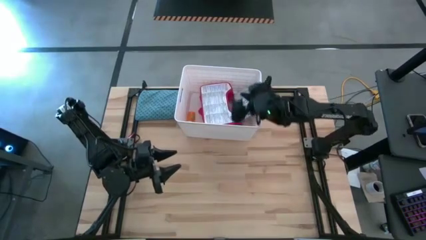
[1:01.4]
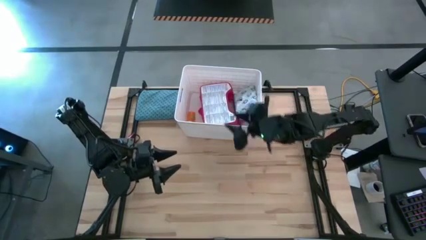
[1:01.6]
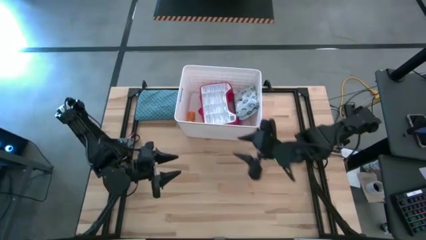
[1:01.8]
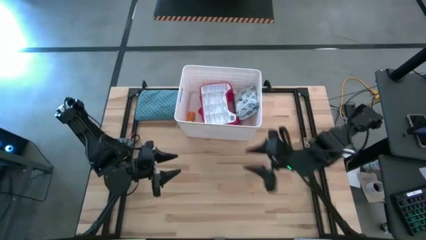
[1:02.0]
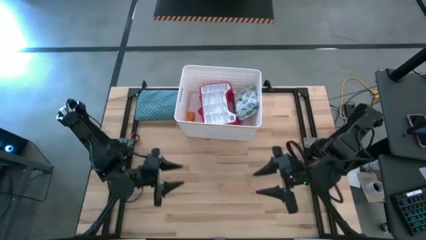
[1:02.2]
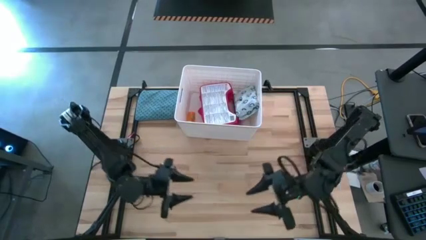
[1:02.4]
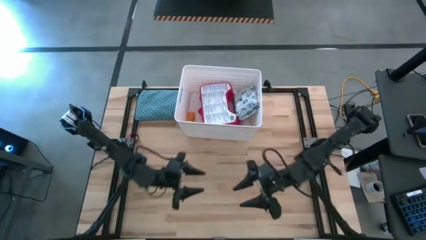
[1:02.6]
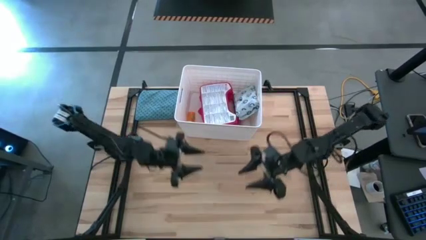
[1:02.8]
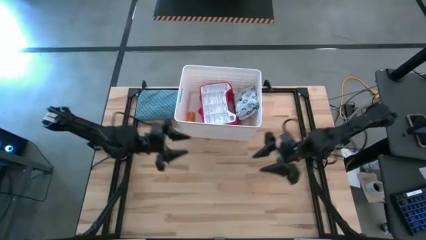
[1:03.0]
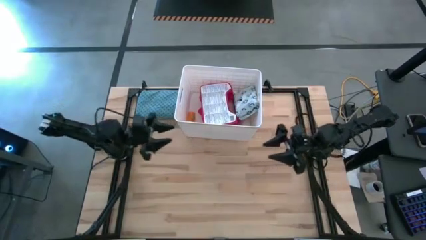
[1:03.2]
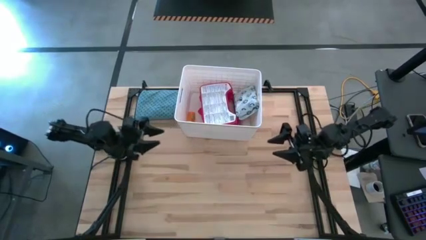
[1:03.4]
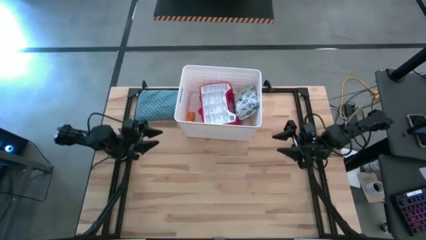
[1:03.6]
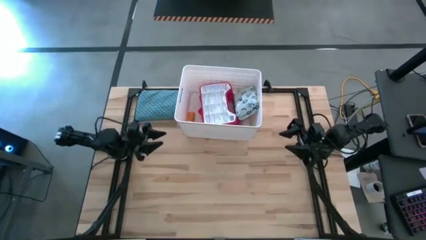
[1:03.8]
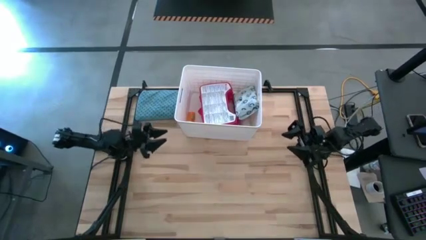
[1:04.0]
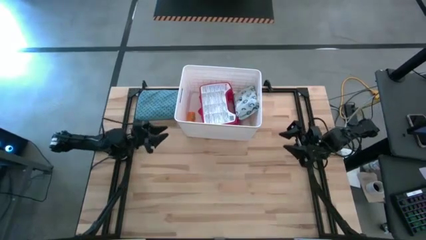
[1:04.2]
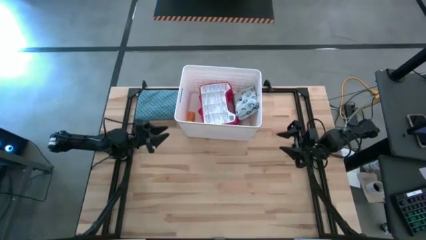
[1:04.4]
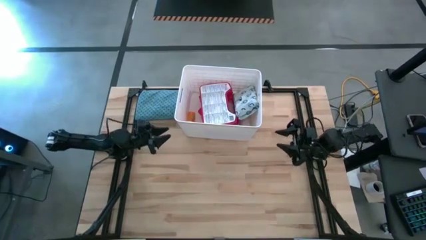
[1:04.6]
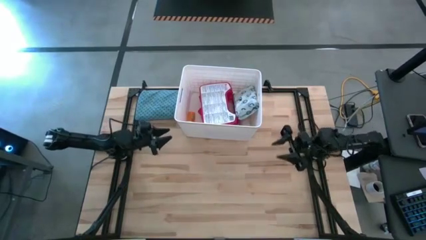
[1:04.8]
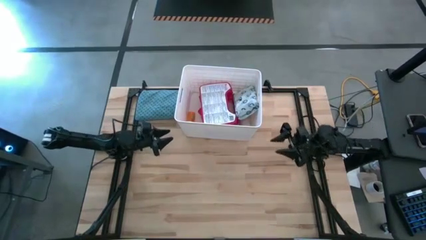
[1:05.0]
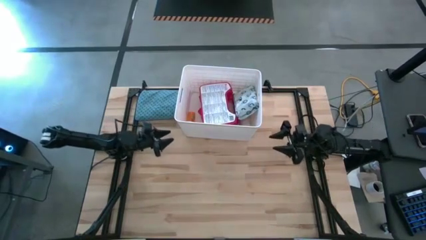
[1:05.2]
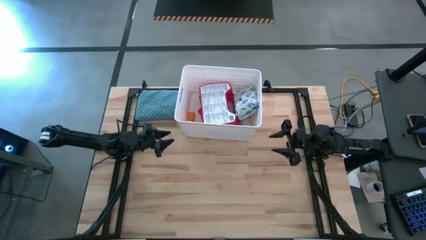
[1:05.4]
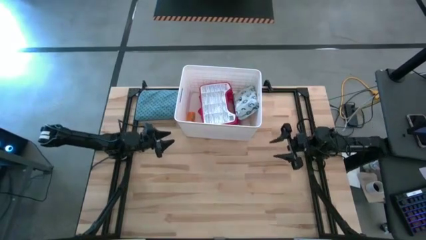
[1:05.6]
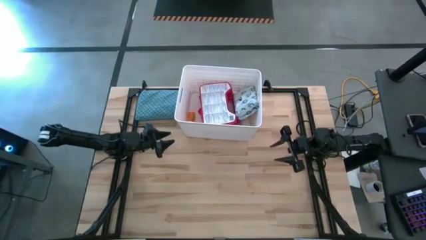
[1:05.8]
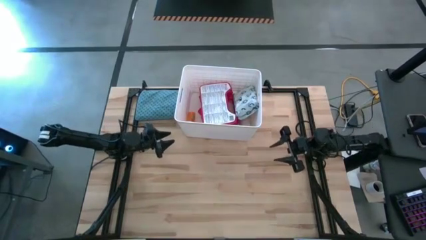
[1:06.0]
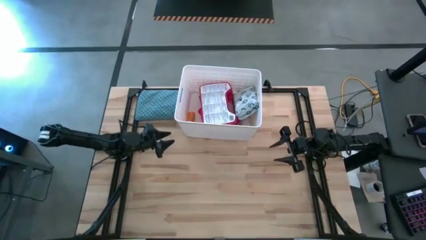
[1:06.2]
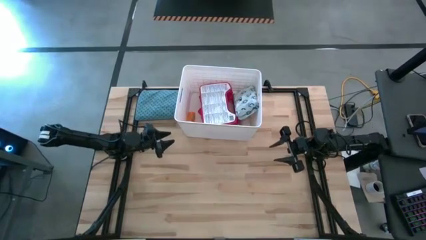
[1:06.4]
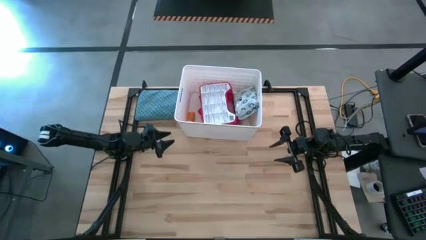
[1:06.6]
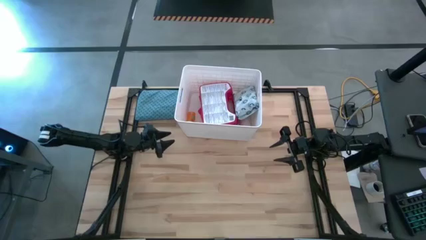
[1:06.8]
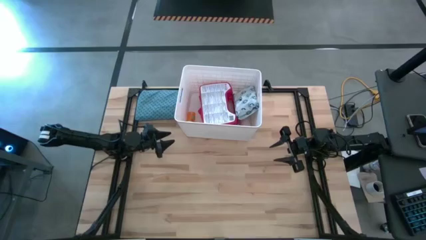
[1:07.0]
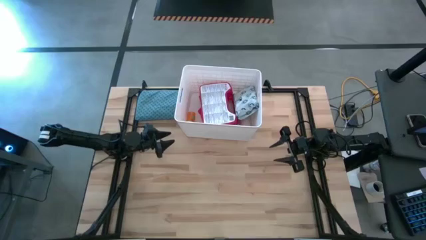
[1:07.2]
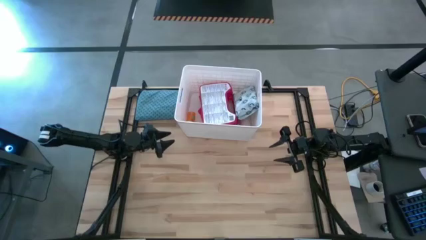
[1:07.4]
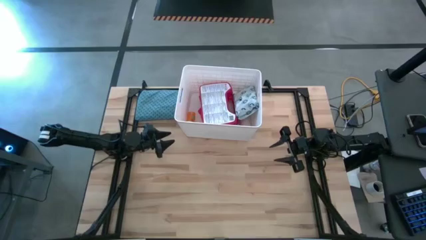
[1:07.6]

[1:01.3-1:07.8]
Task: Pick & place medical supplies in basket/bin
Return to Home Position

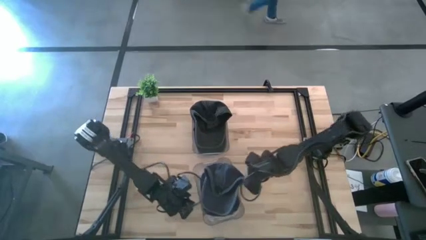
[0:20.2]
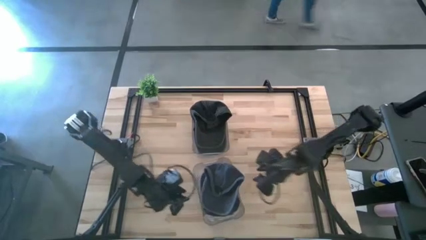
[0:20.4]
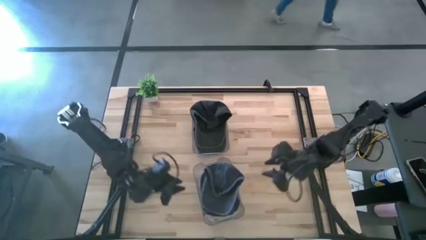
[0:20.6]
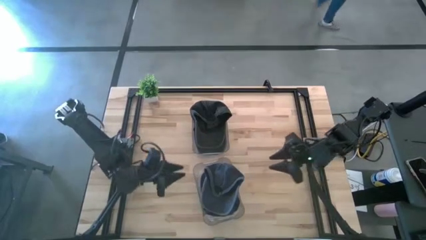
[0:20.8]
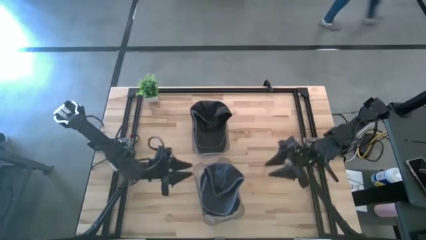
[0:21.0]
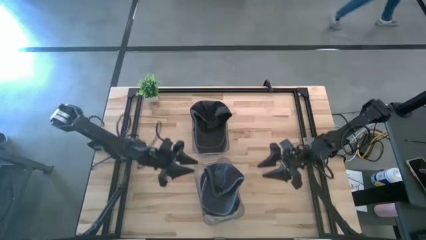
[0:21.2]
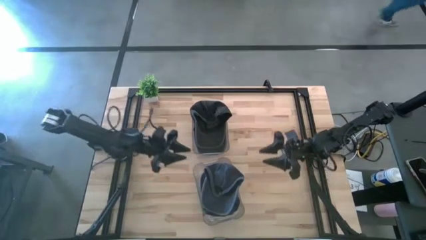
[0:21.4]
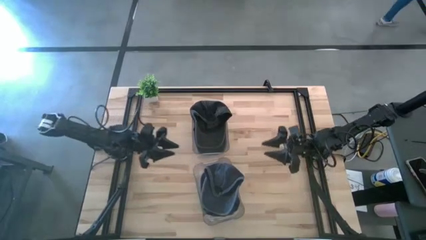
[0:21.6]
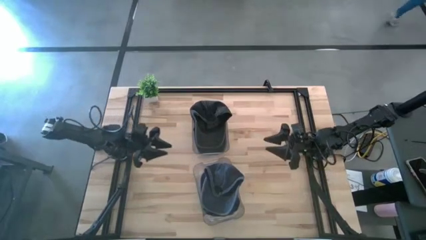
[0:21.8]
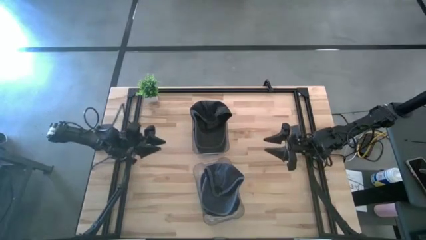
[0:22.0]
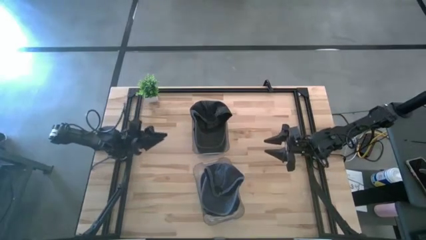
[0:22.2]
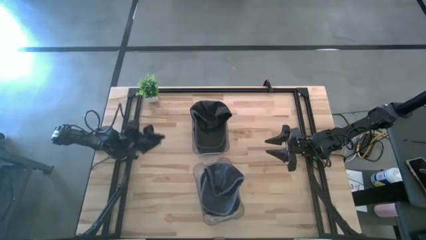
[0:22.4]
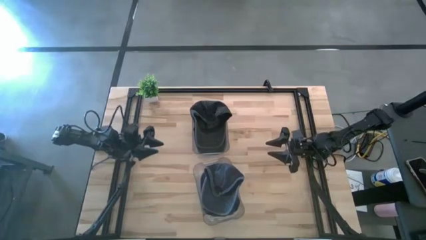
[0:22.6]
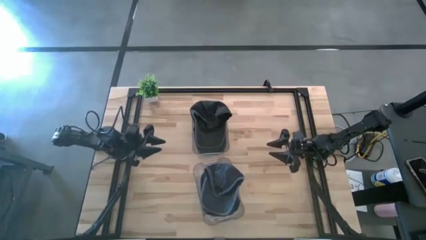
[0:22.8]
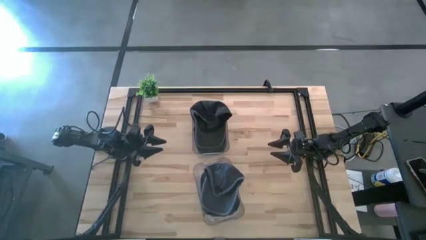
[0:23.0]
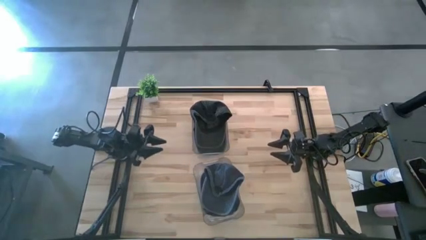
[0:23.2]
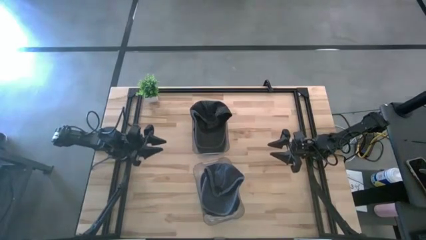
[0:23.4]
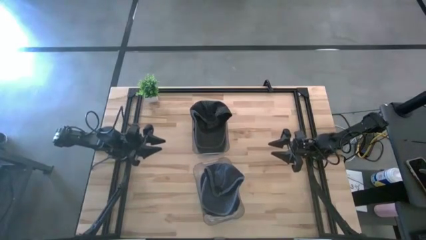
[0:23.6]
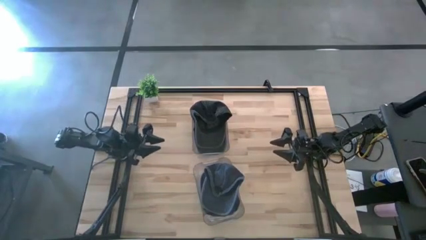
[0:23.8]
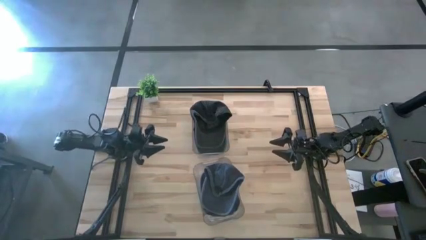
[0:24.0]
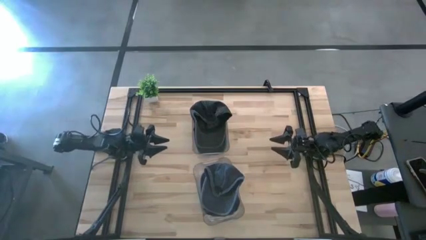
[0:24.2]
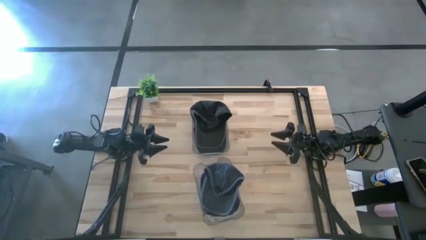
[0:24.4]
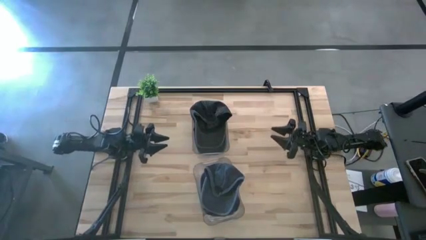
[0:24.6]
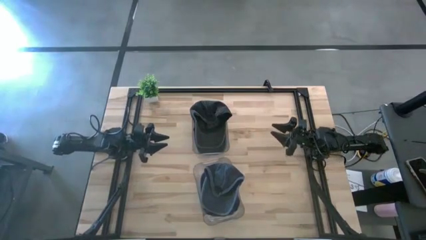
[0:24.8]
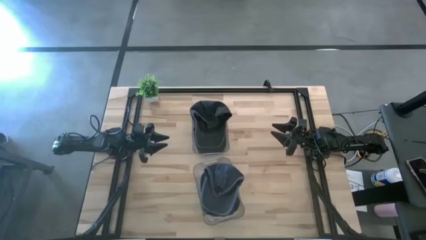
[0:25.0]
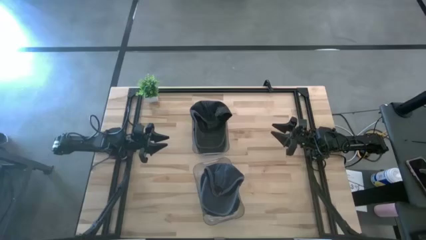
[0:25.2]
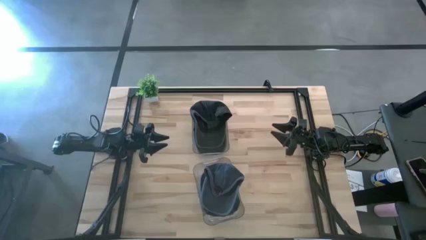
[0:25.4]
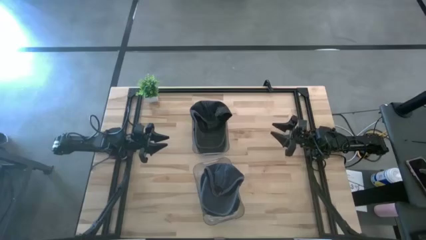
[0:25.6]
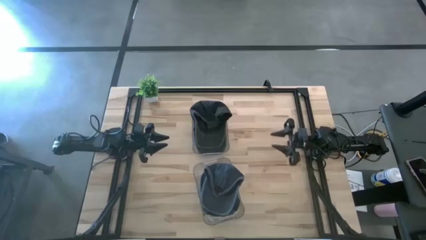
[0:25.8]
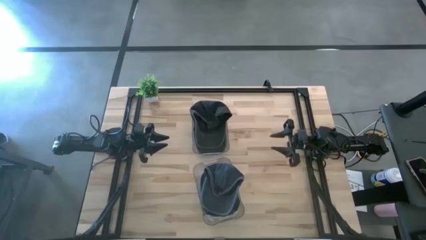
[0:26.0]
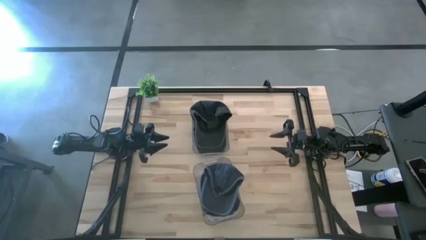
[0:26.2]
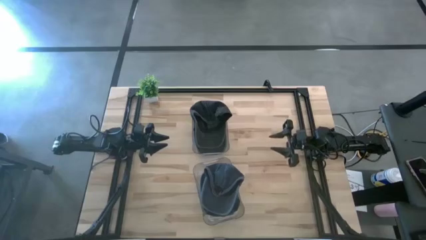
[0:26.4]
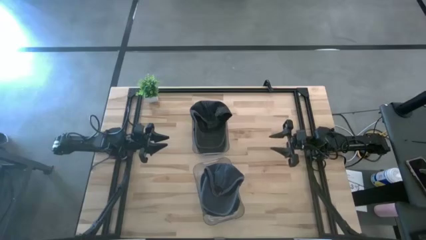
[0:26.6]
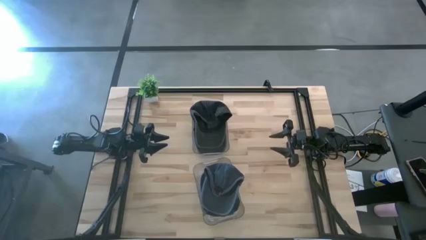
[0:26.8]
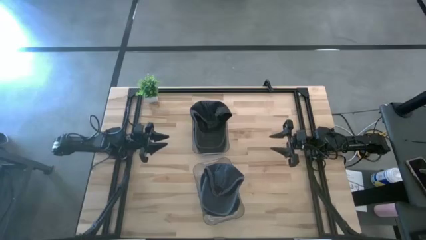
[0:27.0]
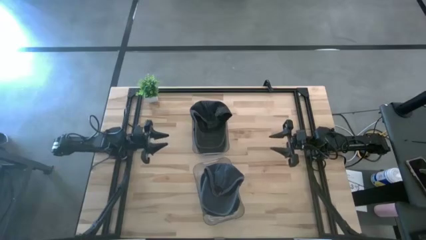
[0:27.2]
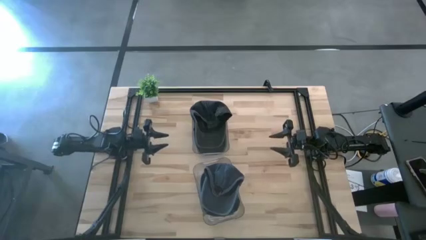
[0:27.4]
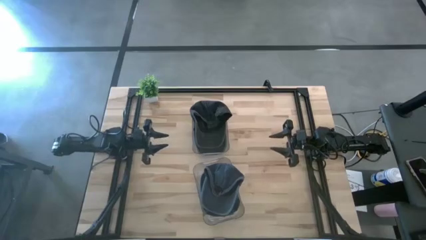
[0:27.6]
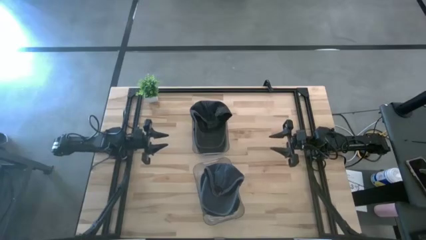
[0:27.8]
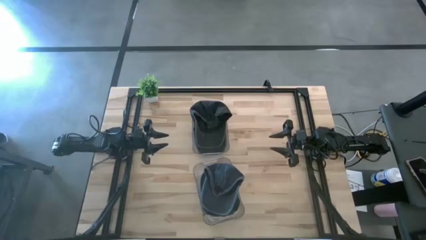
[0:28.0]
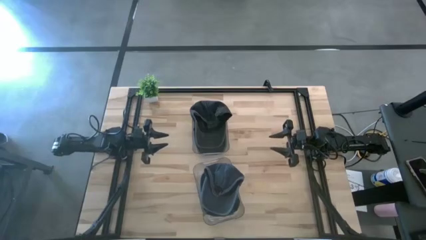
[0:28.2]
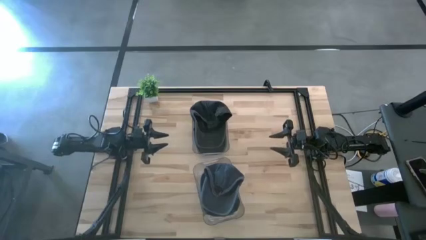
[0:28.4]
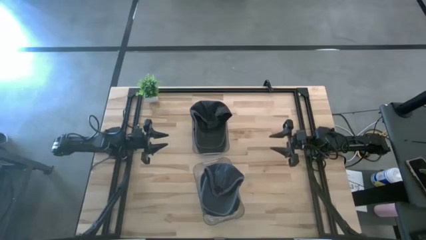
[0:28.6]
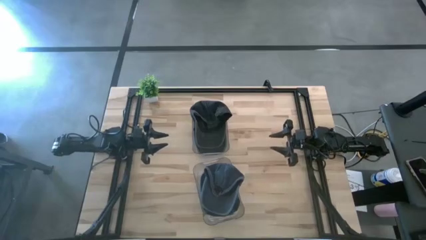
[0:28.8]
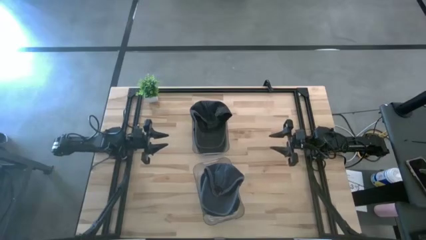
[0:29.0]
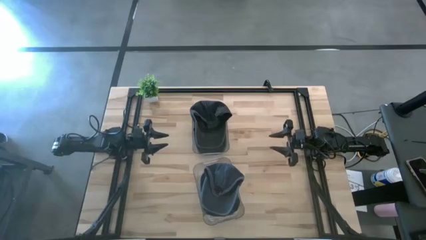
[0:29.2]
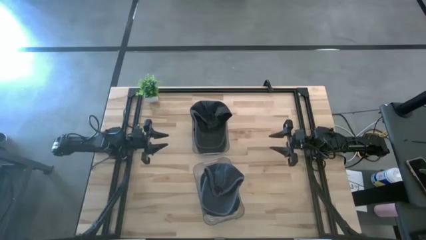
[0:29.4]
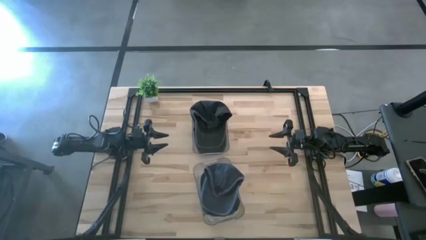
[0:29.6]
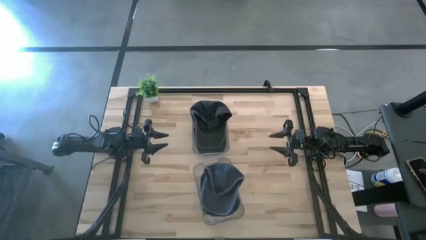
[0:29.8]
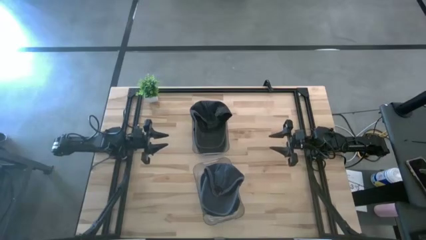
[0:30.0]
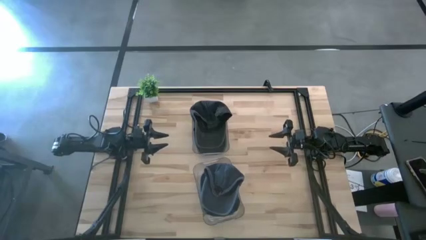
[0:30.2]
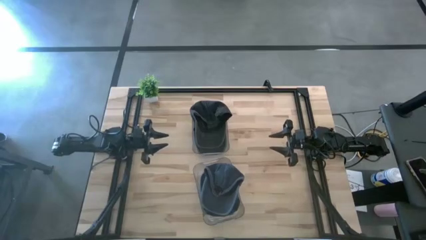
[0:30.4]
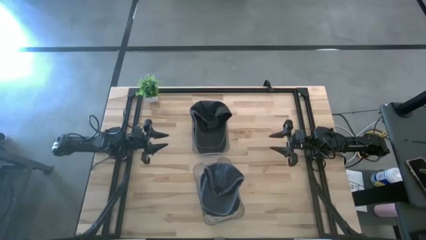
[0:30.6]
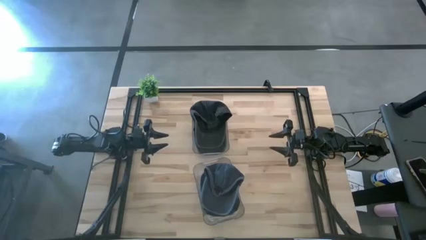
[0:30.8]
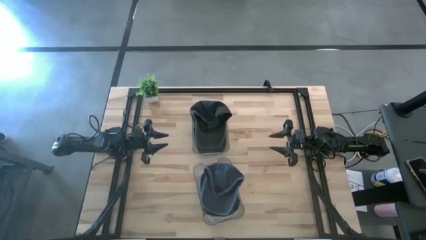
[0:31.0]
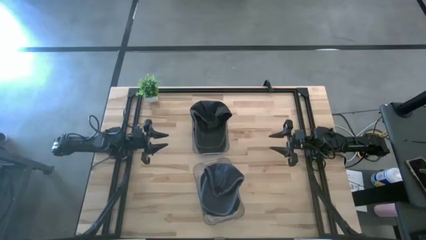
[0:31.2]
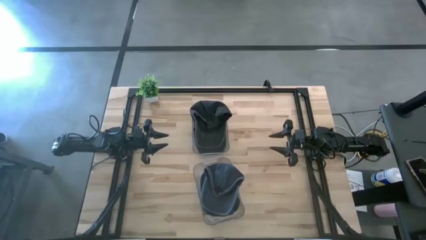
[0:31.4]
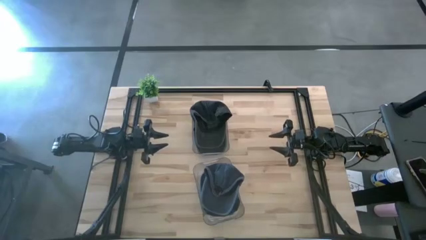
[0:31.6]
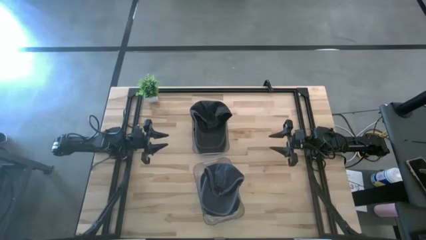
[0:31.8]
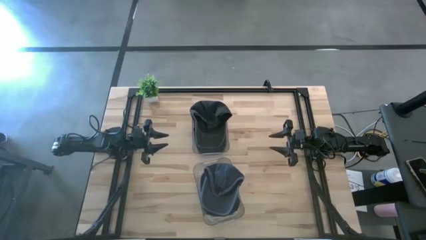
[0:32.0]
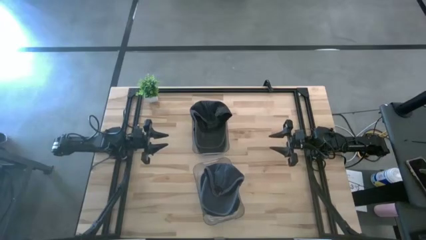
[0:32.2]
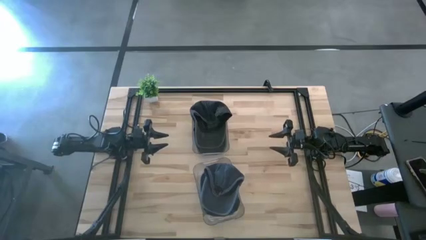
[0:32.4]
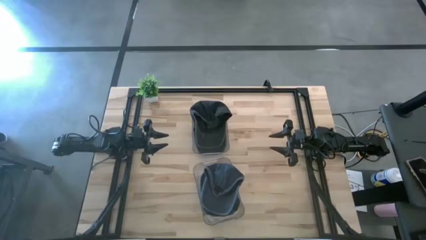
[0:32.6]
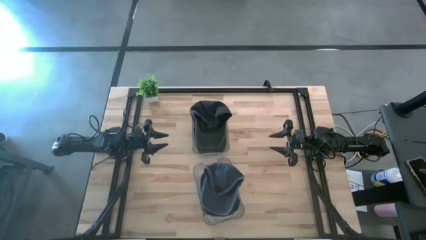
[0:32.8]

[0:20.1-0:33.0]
Task: Pick & Place hat
Return to Home Position
